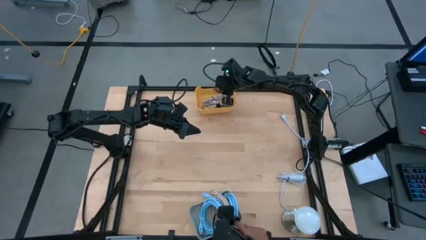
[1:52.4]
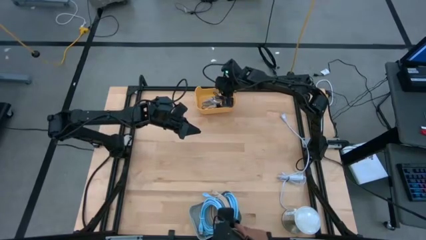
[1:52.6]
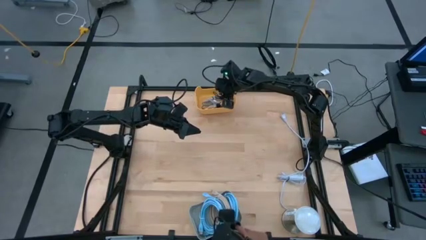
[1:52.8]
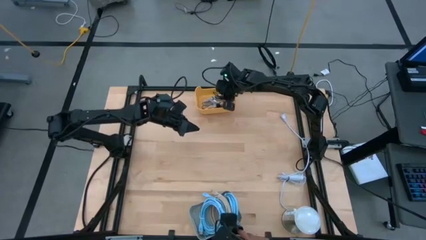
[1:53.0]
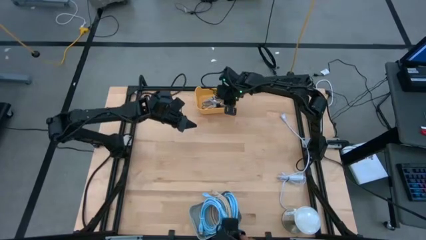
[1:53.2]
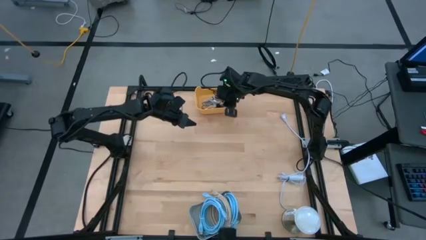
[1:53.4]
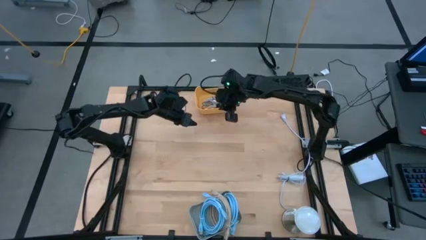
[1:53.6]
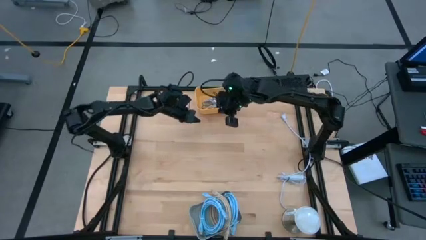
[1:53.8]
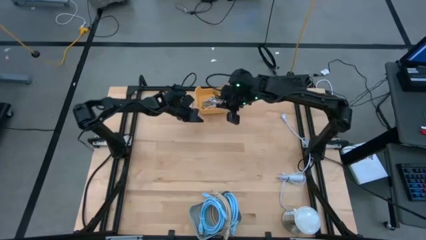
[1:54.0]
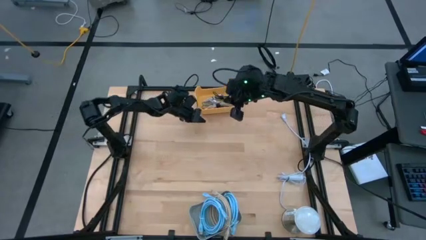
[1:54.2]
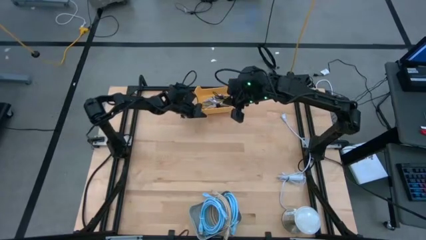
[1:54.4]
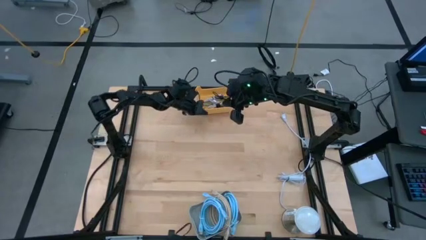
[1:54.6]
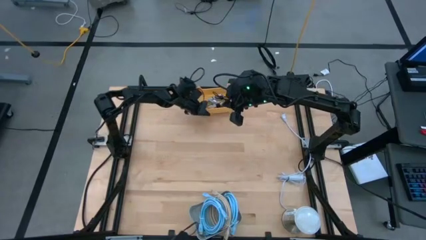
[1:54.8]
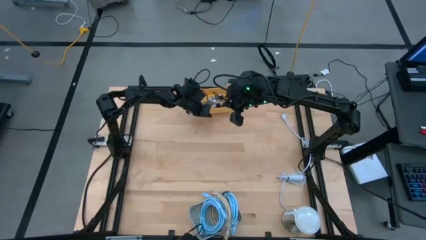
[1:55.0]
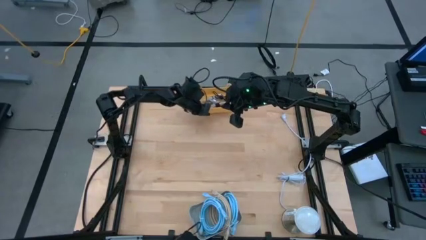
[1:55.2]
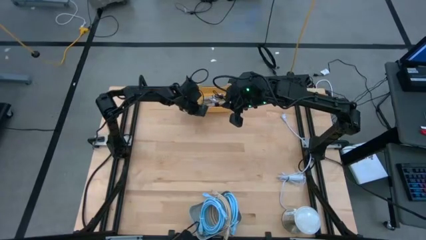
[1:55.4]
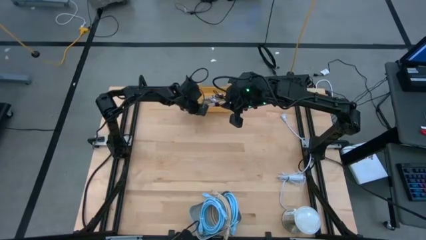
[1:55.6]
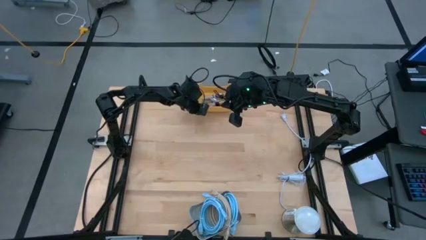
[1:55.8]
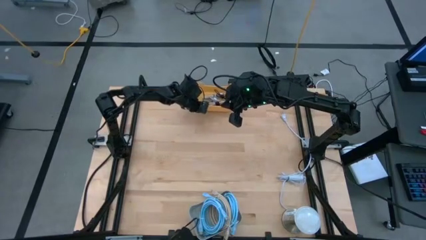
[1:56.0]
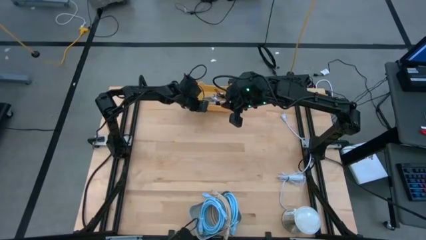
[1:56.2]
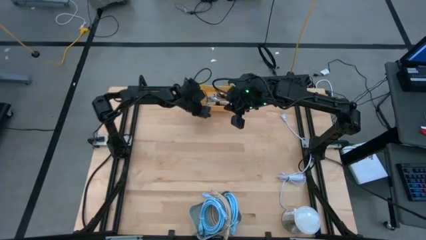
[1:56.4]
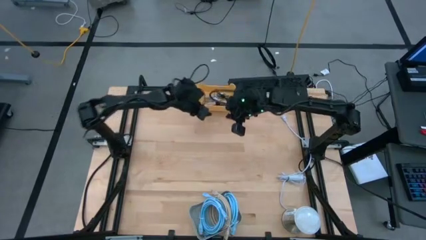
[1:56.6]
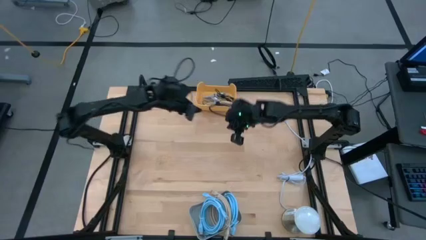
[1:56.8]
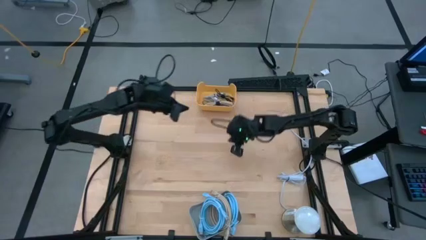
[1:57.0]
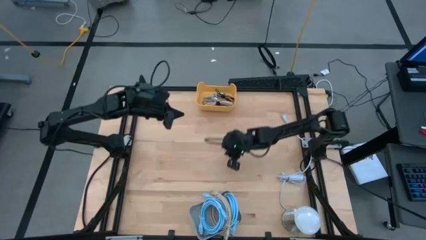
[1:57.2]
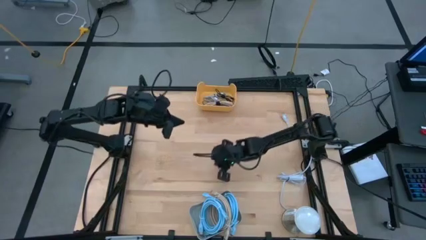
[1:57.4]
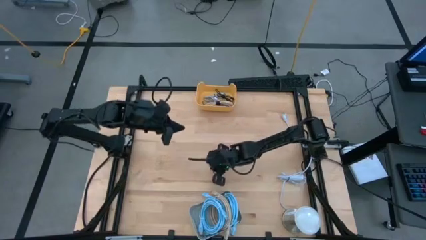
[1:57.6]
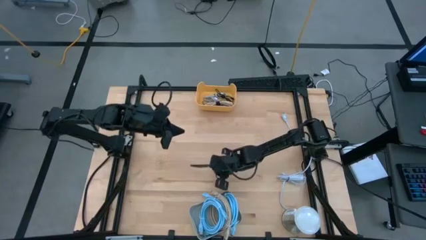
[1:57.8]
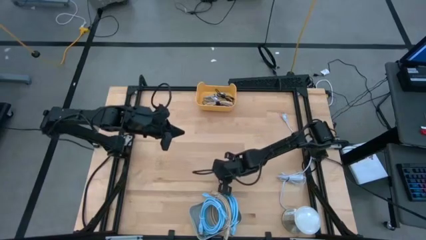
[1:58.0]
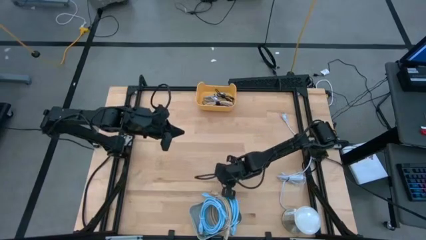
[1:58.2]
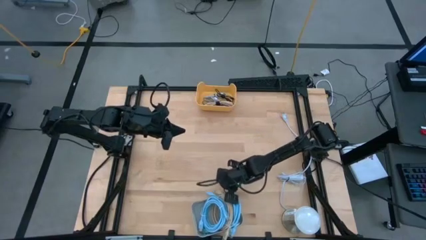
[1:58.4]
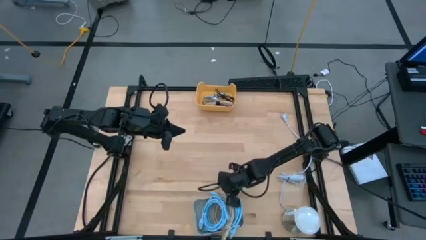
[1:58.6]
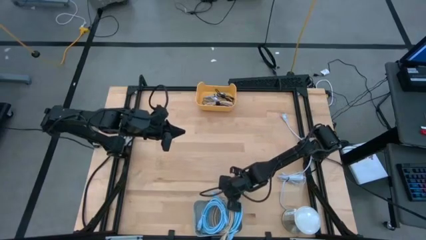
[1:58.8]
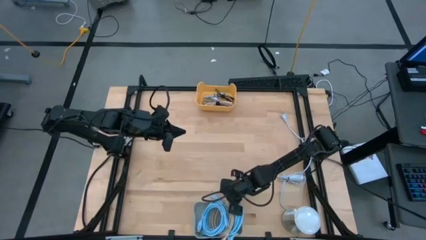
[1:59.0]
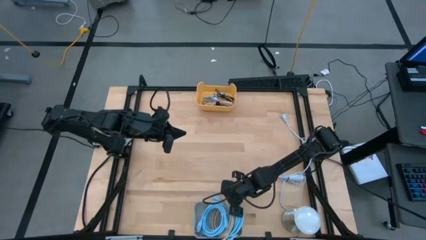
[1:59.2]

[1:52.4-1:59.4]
Task: Sort cables into bins
Adjust the bins

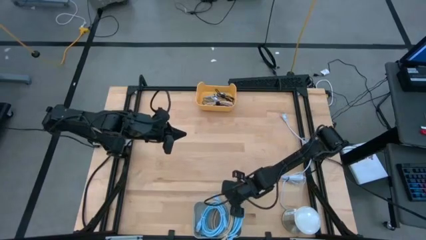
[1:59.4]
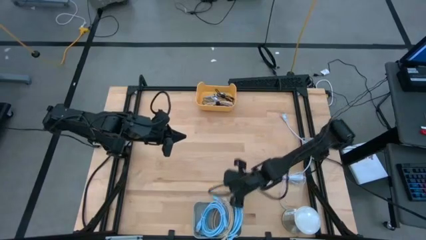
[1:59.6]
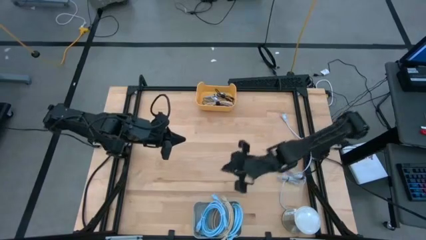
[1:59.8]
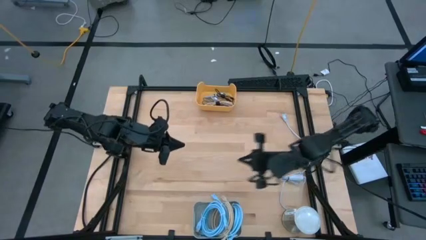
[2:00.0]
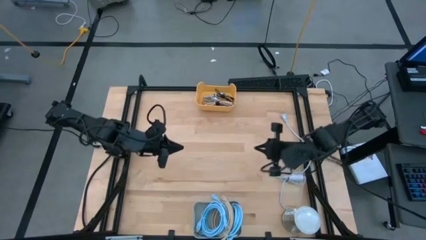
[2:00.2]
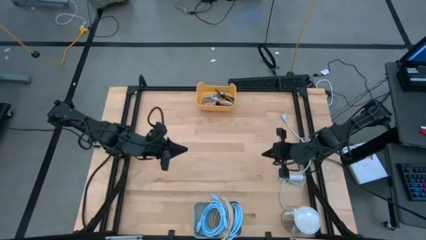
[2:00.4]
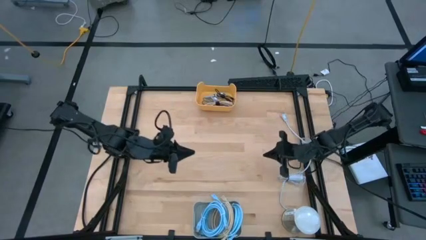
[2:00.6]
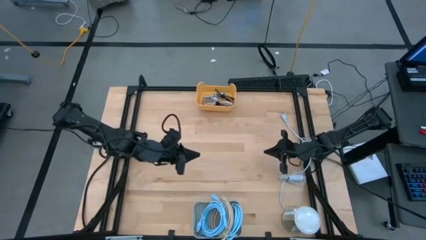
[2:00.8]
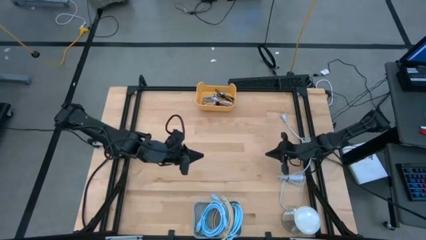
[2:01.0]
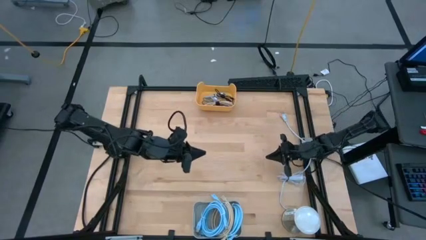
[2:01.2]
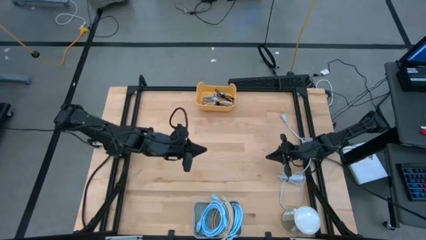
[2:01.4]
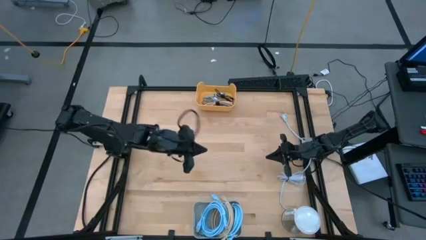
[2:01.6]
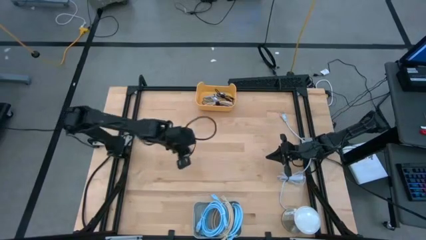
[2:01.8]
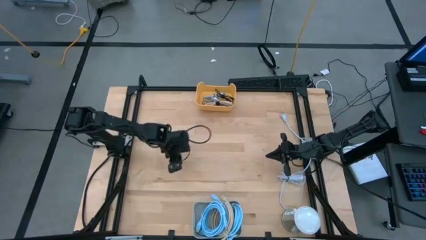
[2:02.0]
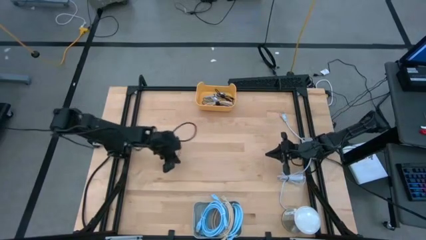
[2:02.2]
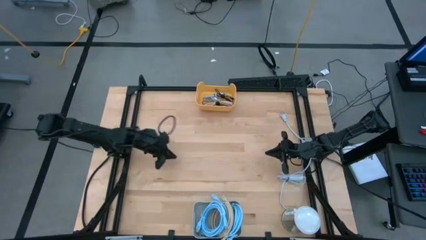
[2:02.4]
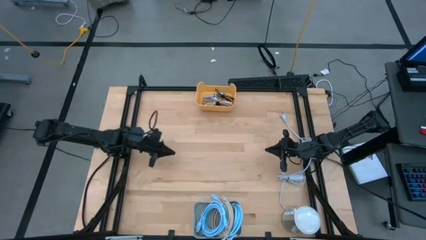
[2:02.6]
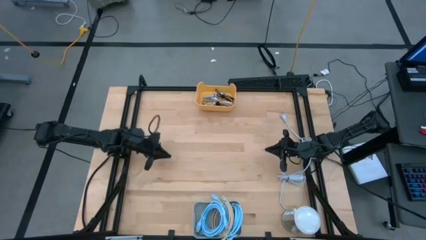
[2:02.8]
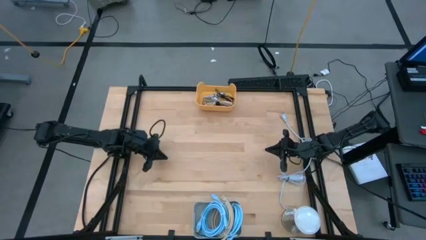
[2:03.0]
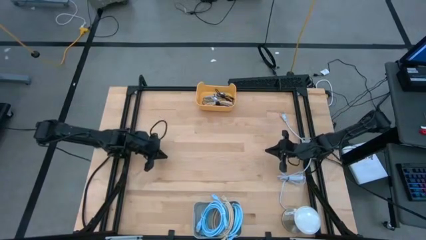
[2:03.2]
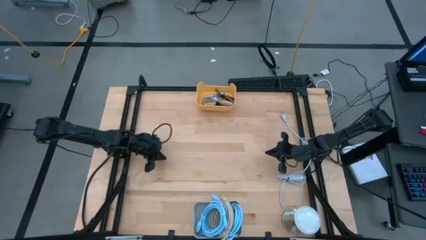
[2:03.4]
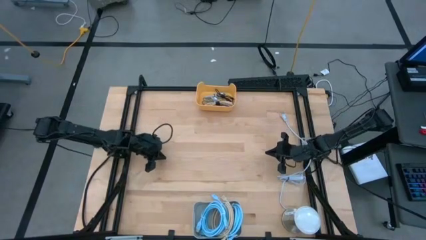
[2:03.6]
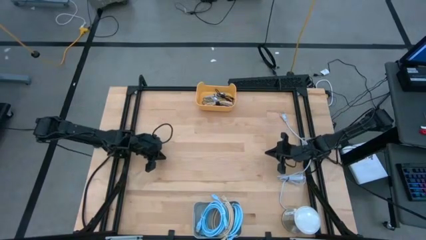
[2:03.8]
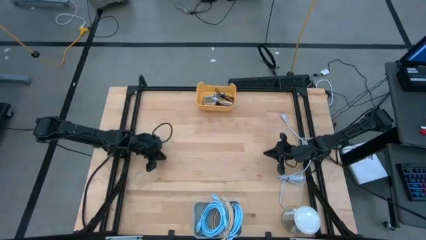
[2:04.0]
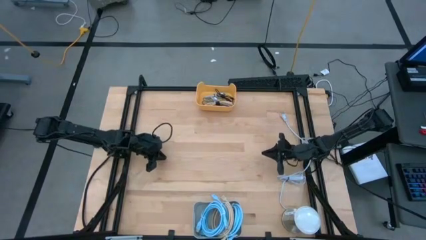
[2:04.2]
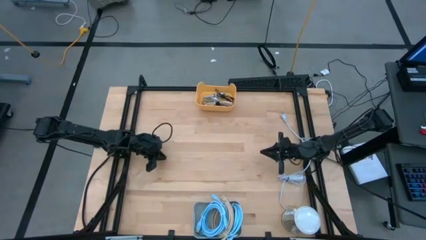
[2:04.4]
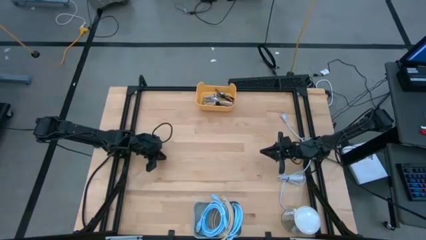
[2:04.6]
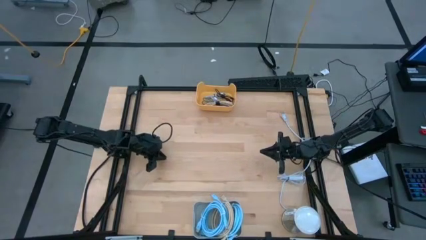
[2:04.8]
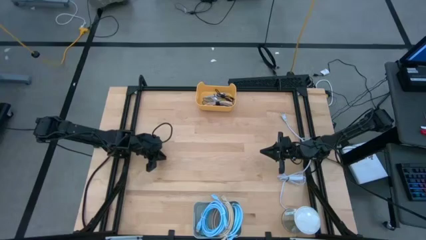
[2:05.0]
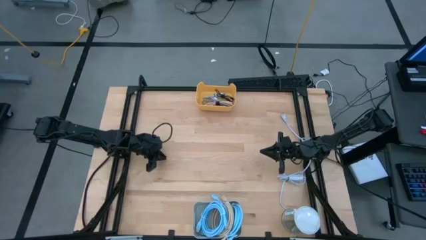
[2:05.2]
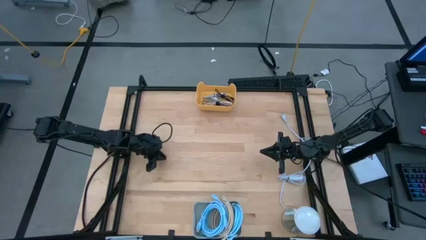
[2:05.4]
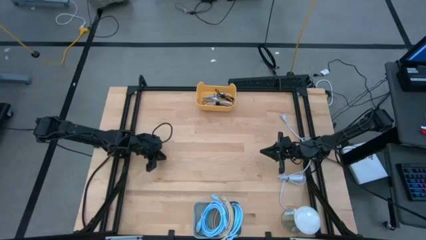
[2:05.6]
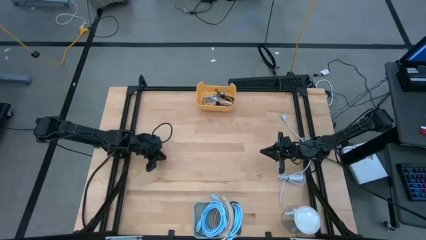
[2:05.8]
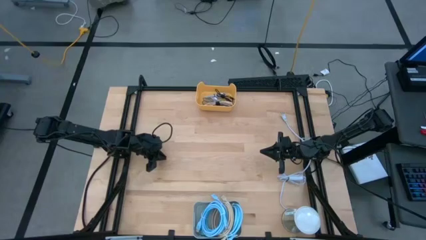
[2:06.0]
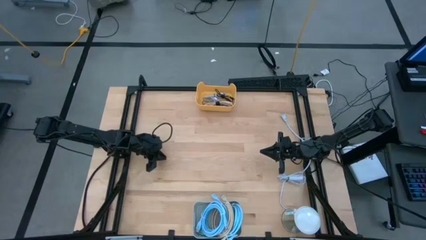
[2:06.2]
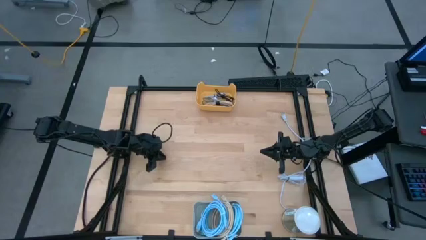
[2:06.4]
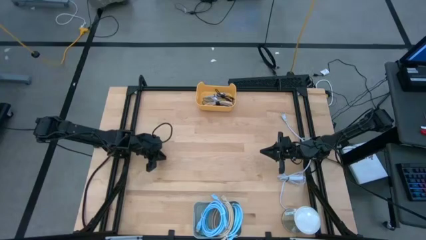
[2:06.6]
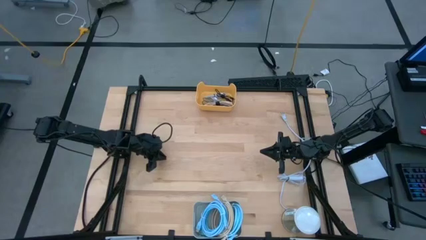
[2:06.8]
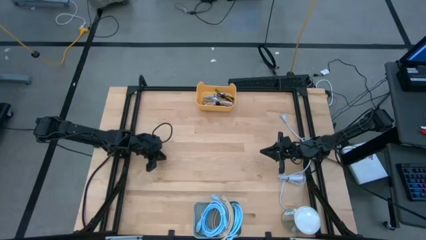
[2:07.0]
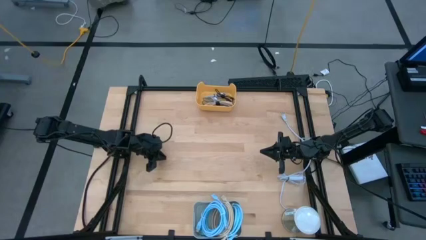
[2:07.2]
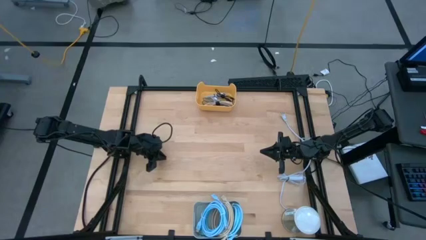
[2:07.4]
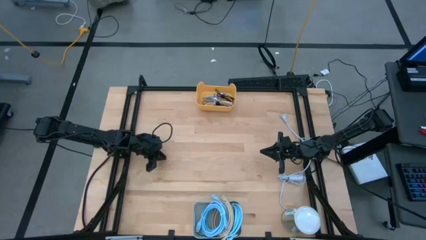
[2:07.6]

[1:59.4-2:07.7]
Return to Home Position

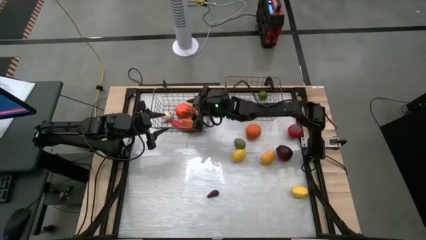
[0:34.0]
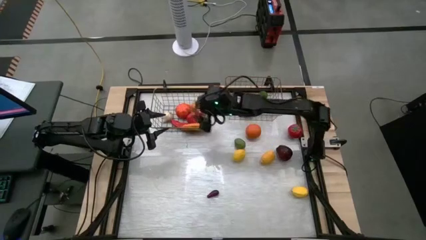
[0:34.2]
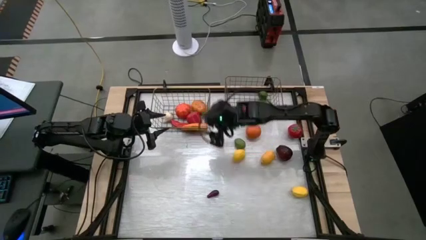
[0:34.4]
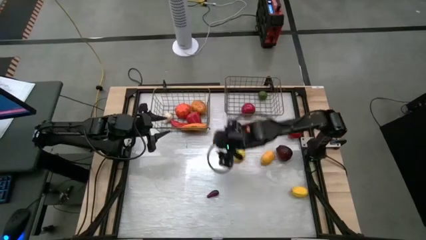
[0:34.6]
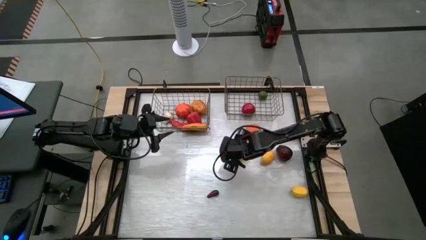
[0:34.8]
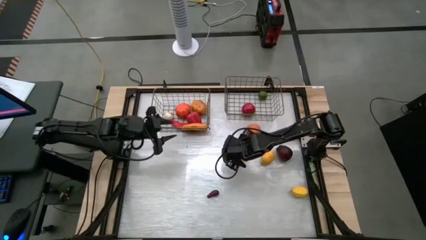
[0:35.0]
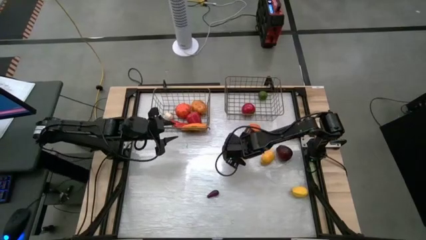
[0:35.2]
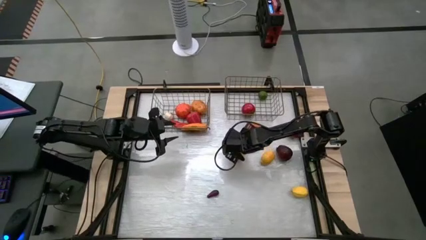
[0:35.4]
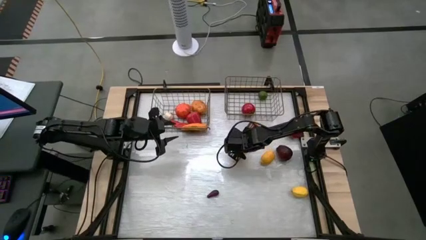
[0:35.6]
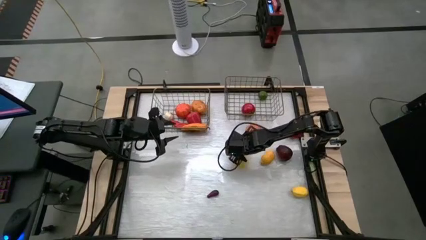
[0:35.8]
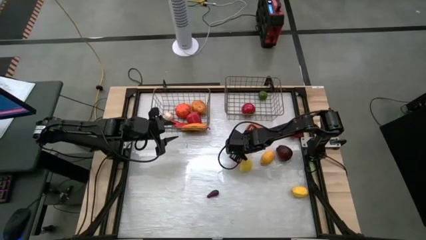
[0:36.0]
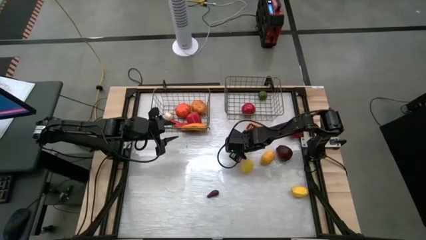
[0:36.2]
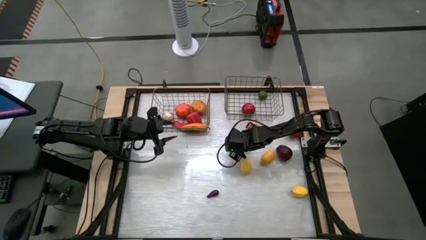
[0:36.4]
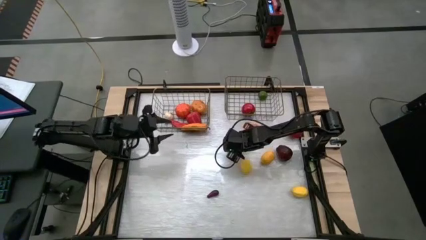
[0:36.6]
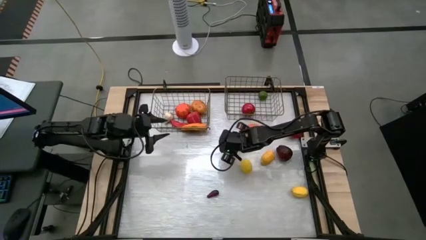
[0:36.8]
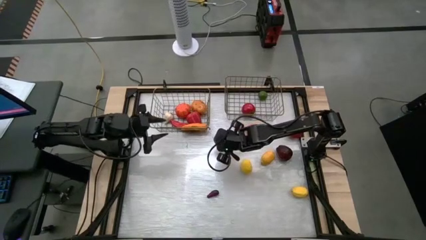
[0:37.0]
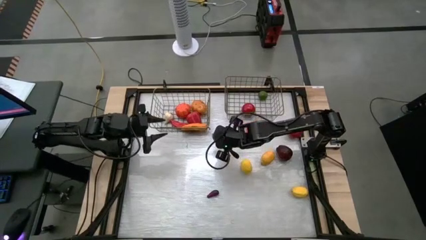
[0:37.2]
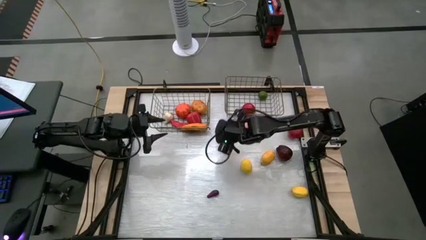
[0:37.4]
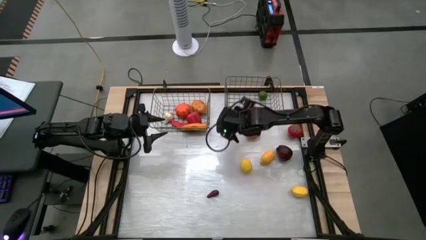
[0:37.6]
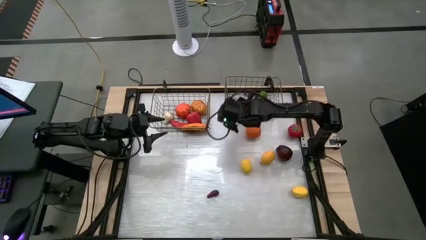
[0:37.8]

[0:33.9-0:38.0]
Task: Sort produce into baskets
Put the green lime into the right gold wire basket
